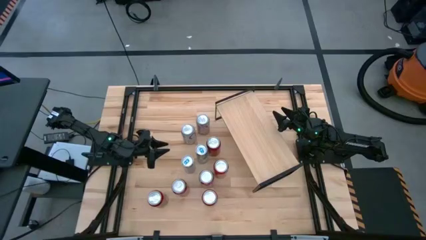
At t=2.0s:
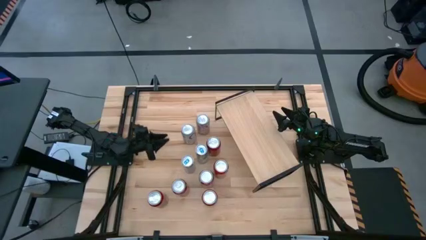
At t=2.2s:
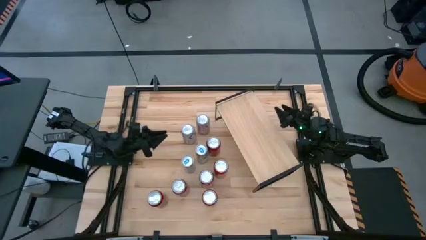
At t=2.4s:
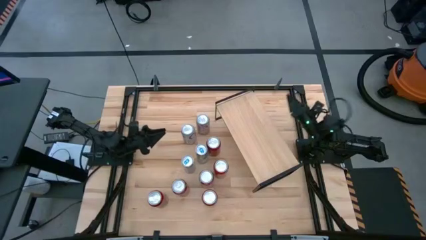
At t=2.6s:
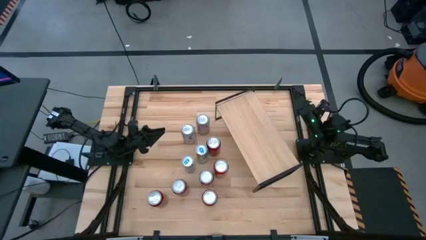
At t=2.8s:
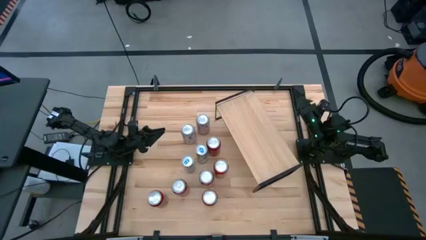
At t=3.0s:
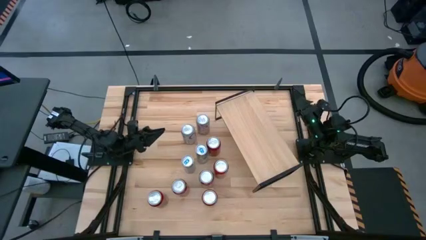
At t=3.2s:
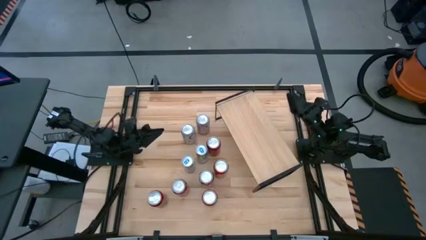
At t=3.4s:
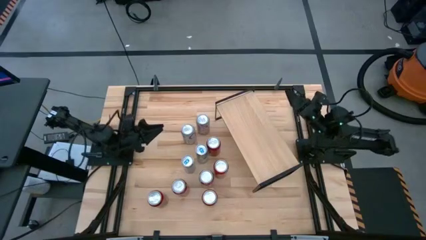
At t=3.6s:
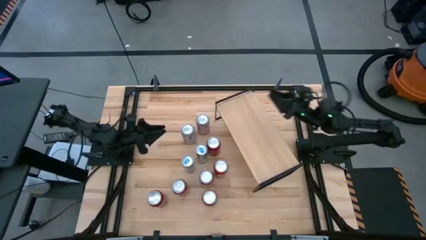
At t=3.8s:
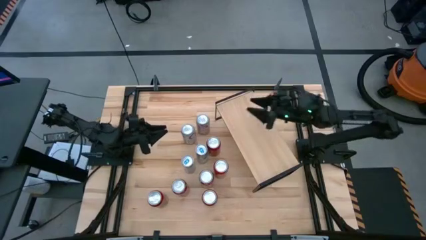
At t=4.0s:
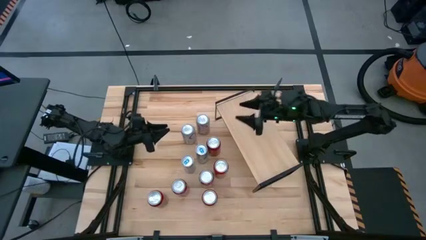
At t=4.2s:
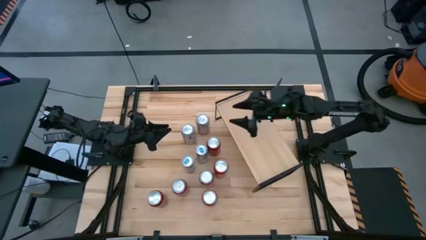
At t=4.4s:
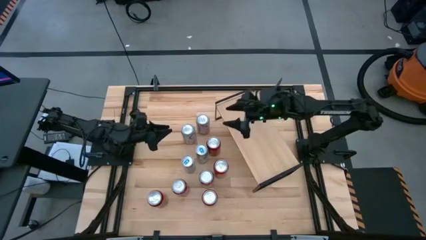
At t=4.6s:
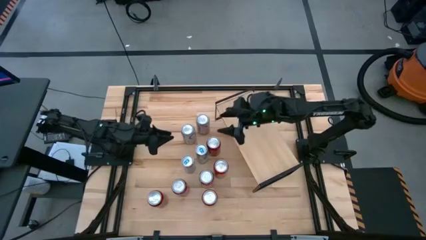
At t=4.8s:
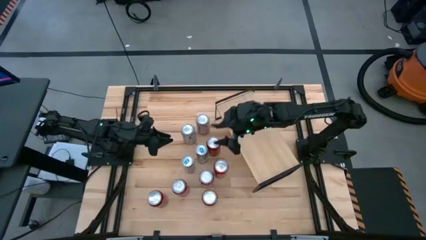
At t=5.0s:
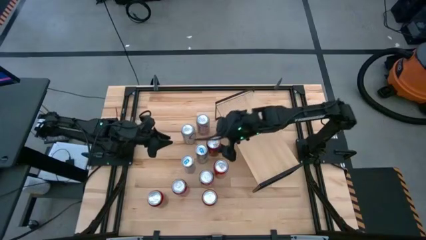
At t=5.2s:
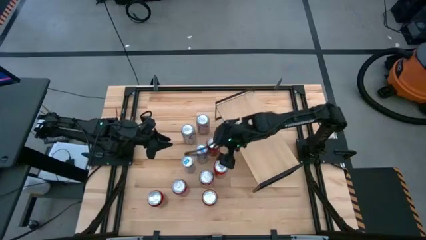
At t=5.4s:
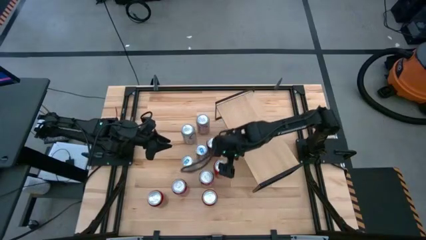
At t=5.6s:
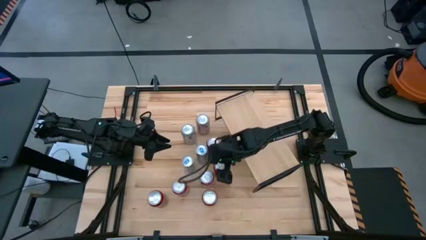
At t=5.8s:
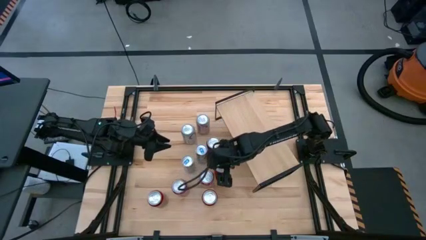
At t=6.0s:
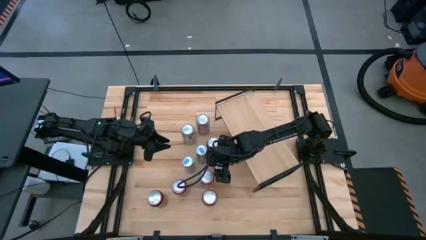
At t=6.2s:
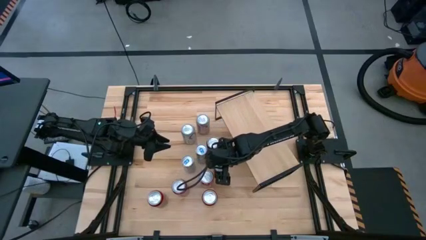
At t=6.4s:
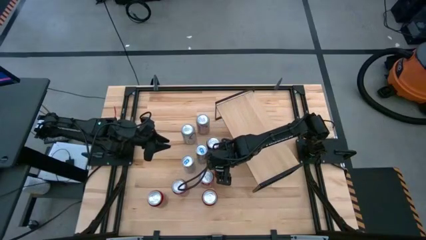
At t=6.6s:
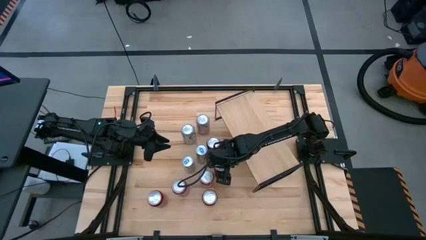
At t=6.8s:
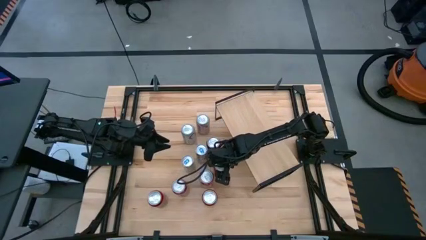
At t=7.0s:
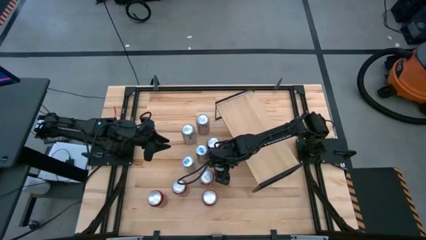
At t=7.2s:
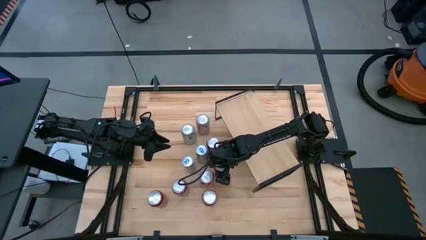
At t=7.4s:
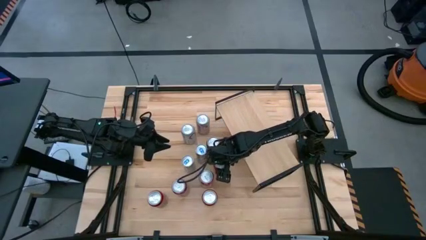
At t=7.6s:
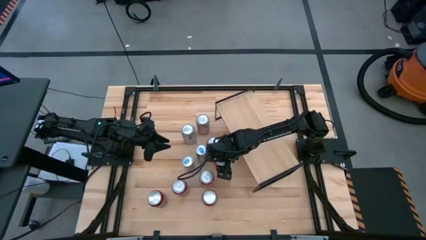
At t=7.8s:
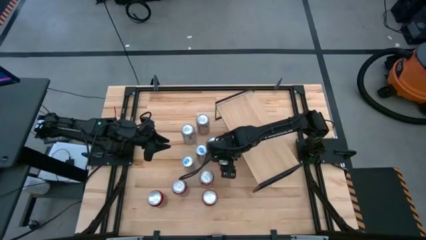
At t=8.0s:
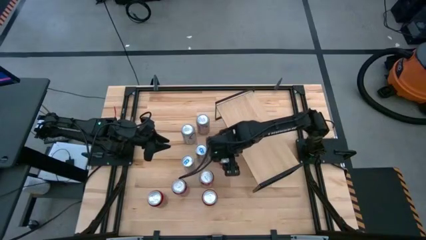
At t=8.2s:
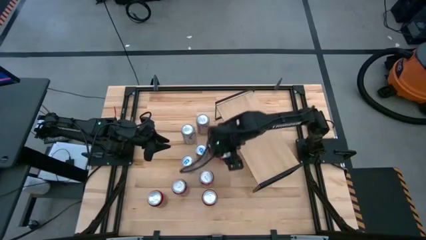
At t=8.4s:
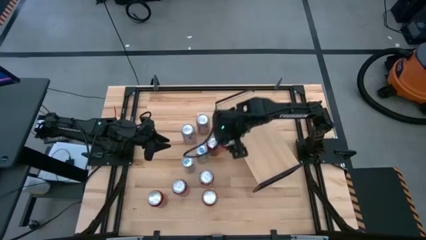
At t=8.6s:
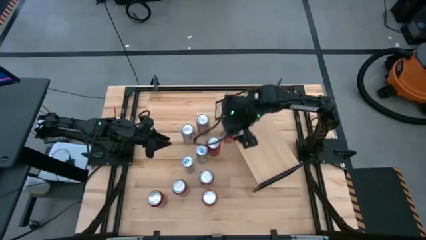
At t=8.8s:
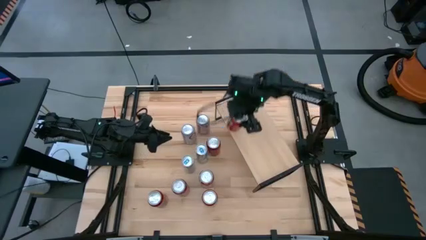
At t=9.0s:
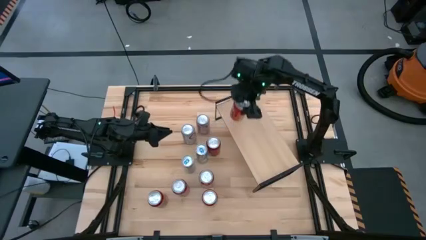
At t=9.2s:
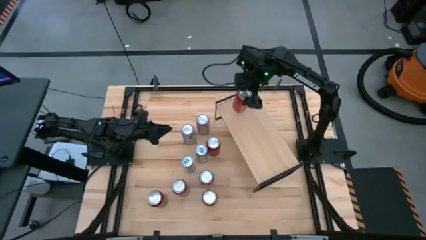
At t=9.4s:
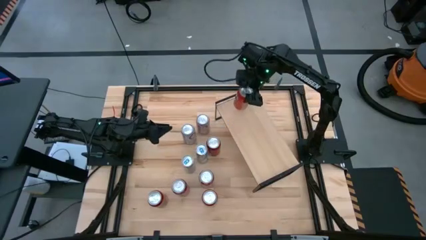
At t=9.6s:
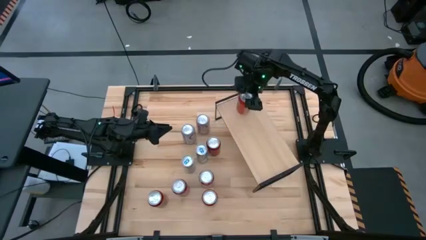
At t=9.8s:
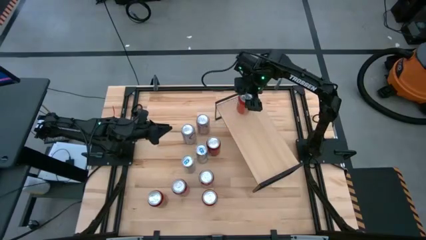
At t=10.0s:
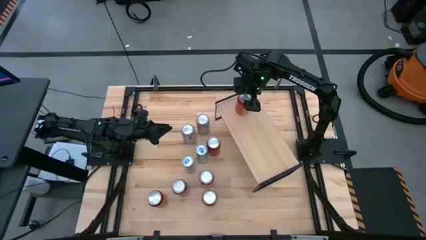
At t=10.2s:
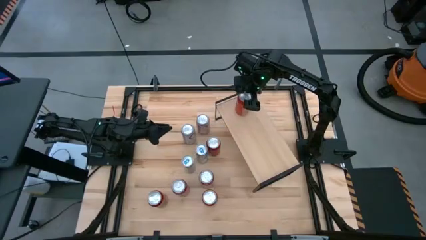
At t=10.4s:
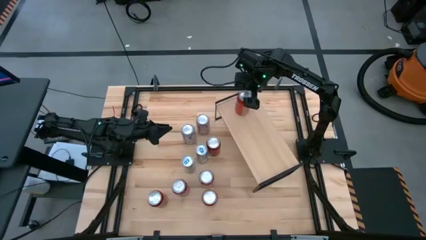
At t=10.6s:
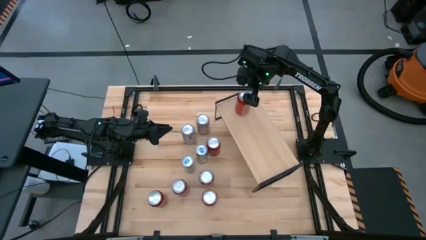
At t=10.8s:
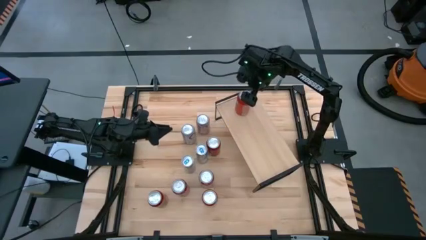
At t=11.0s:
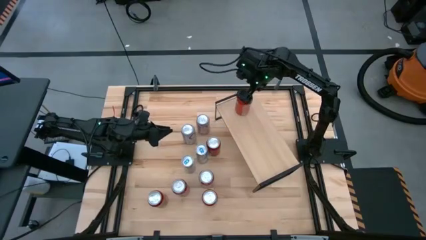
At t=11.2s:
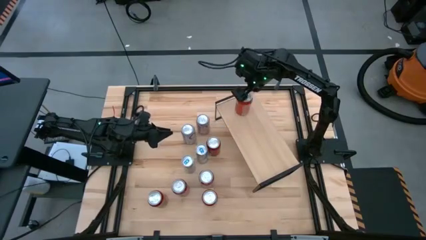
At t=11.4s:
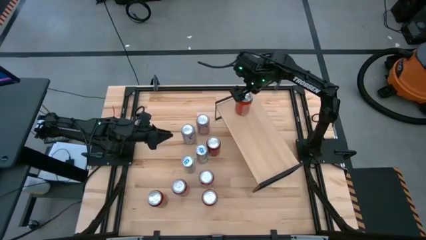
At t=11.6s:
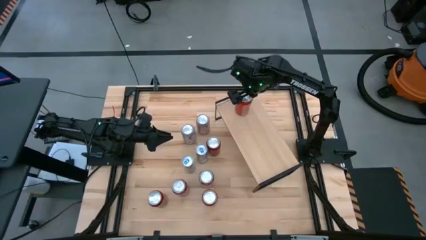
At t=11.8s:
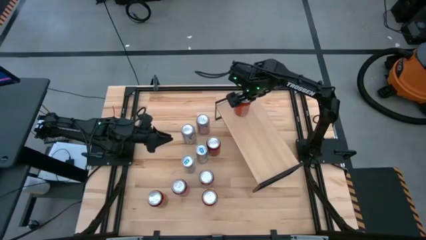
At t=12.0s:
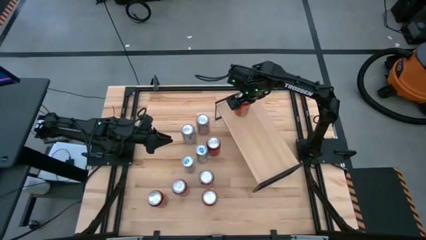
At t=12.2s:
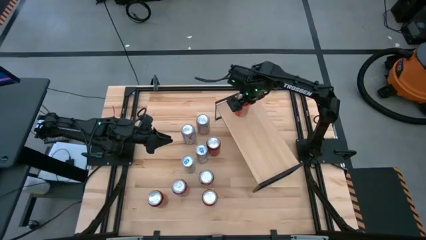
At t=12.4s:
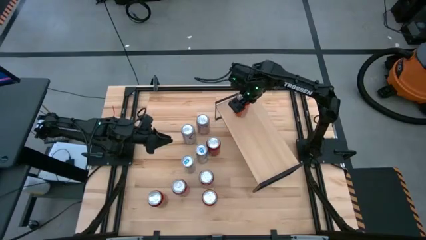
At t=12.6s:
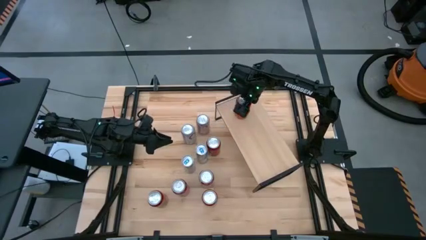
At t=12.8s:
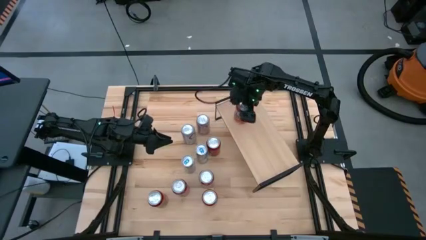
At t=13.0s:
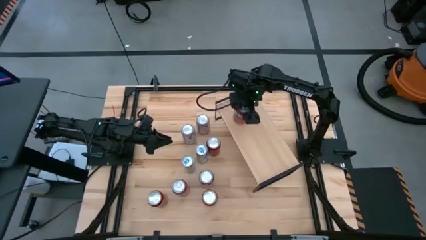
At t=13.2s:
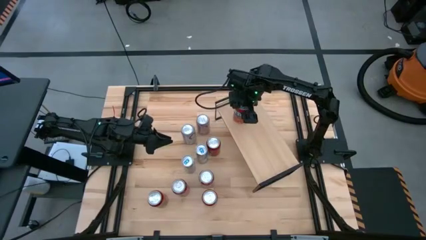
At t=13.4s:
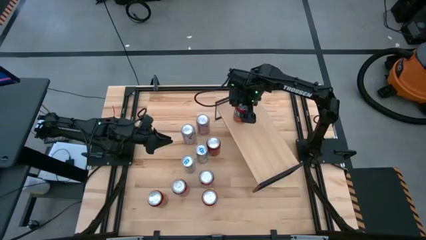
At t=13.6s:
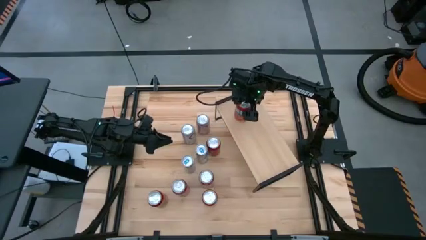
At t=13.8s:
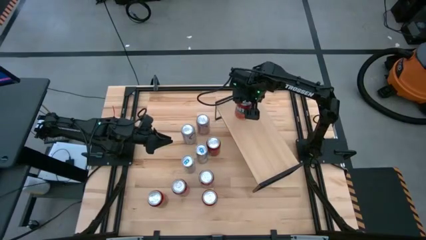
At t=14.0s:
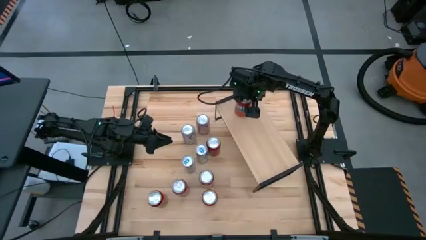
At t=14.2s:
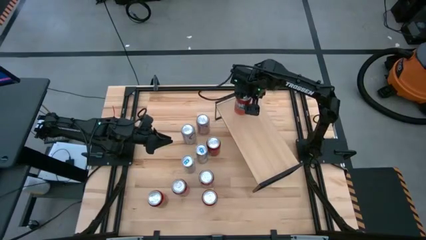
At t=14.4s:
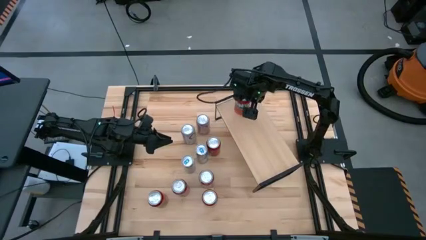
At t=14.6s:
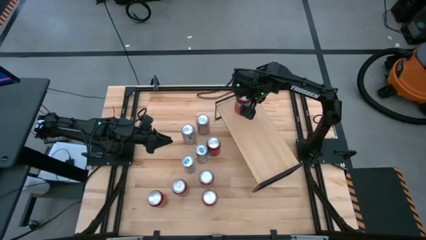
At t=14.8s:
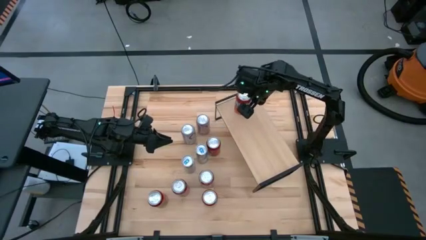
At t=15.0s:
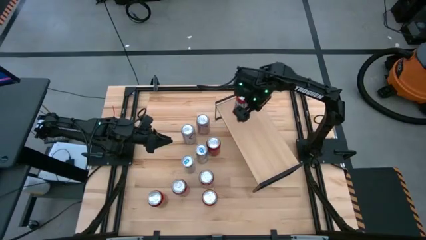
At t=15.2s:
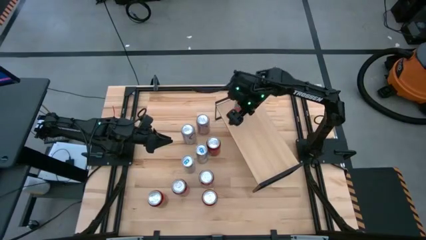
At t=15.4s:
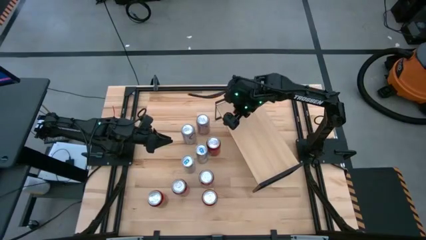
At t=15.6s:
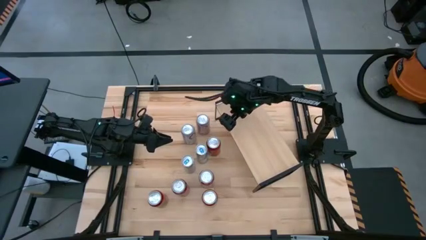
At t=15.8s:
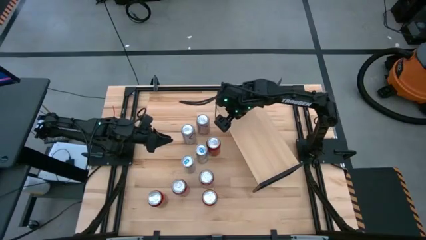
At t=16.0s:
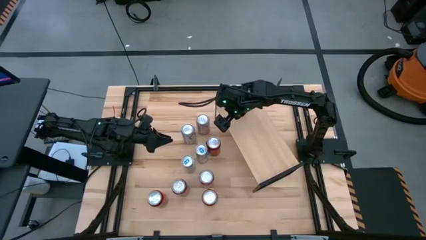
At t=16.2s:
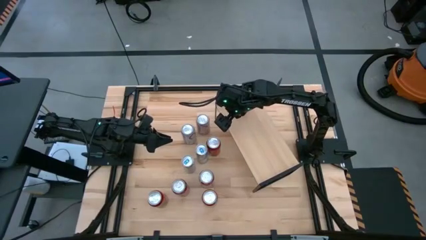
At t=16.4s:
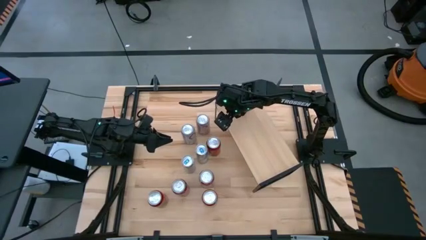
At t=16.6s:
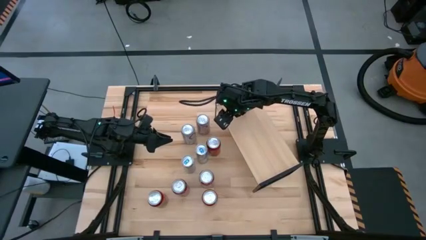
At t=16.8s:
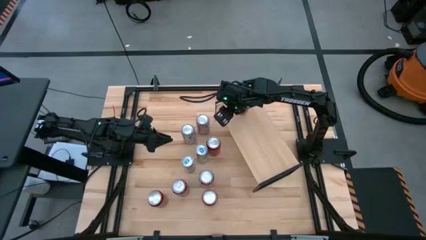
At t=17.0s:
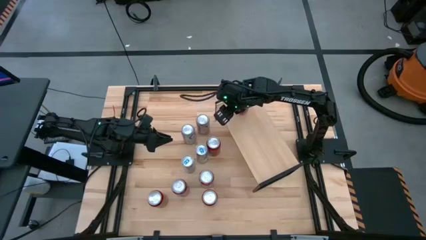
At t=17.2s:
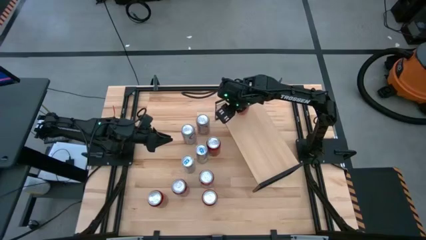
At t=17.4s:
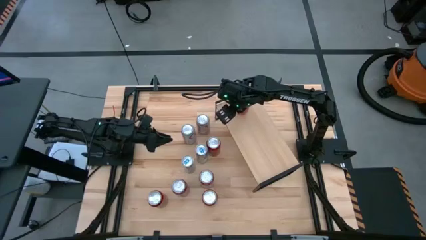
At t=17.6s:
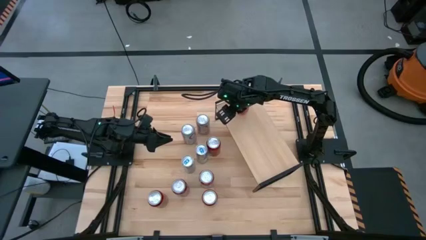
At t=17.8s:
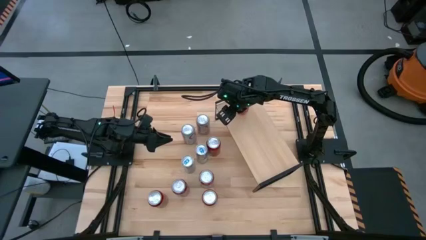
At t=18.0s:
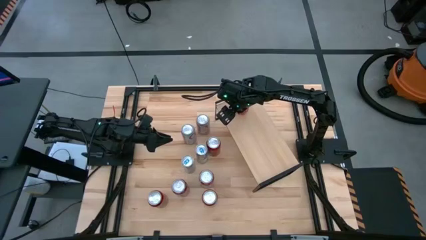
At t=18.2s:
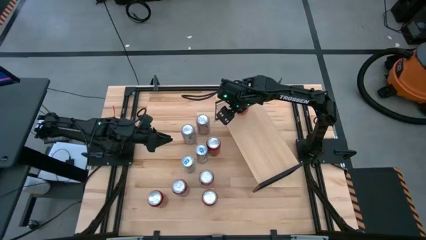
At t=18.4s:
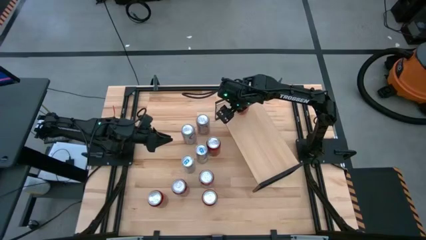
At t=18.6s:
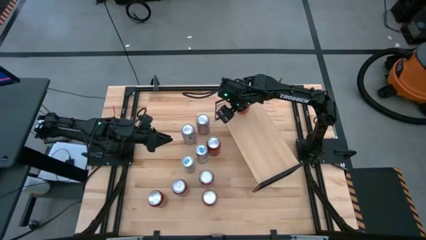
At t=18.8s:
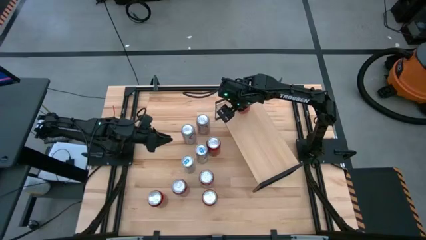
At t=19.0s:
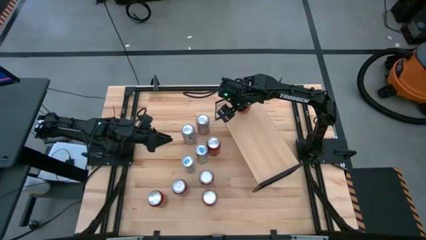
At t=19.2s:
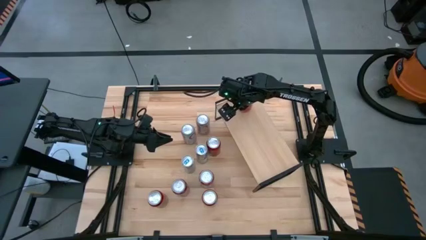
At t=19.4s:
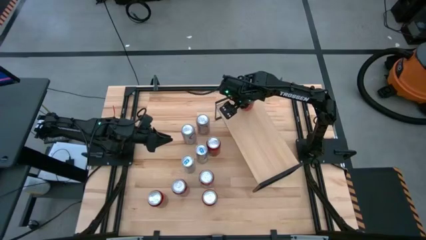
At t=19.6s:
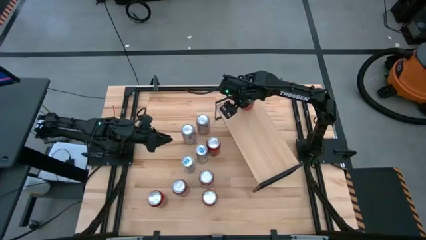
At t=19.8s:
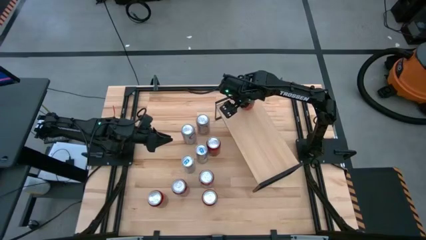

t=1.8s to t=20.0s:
Task: Place canned beverage on shelf
Put the top orange soda can on the shelf
